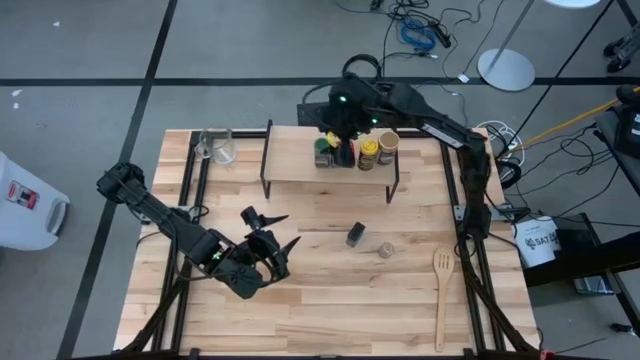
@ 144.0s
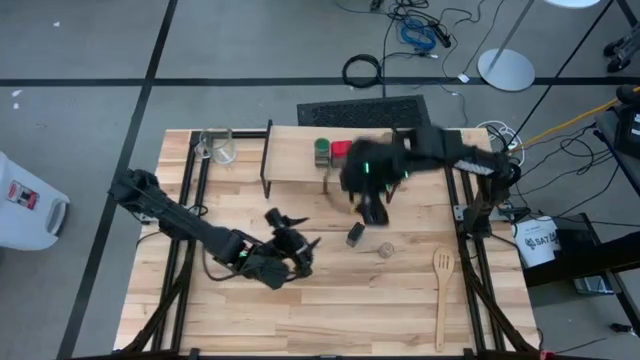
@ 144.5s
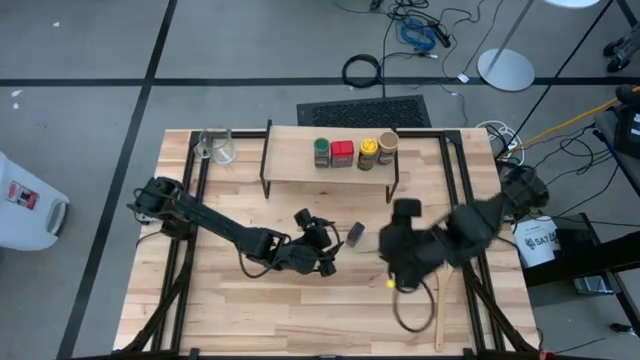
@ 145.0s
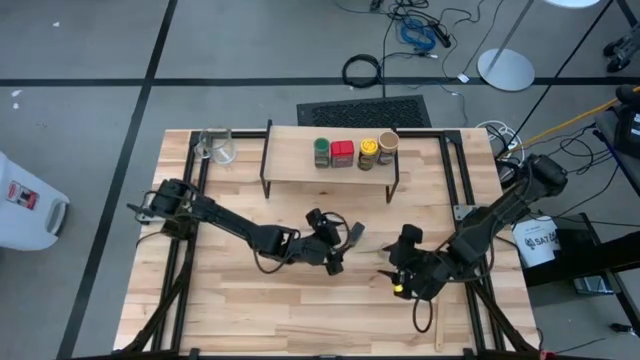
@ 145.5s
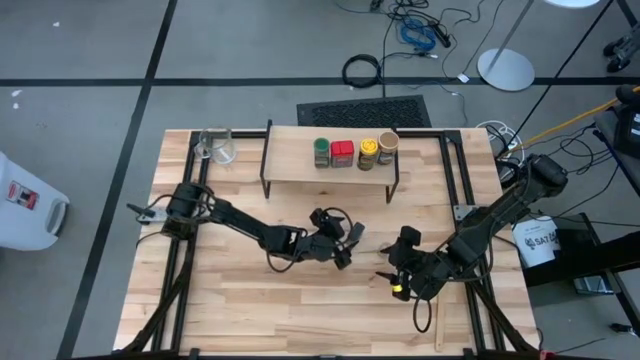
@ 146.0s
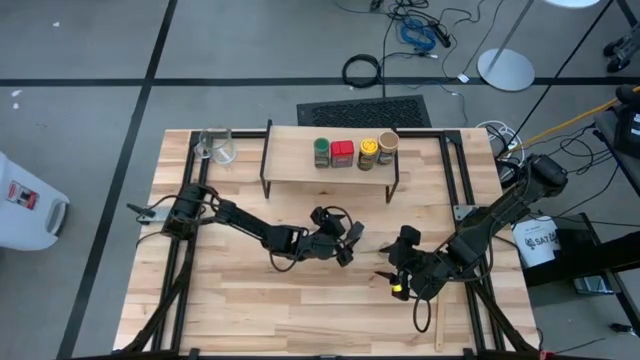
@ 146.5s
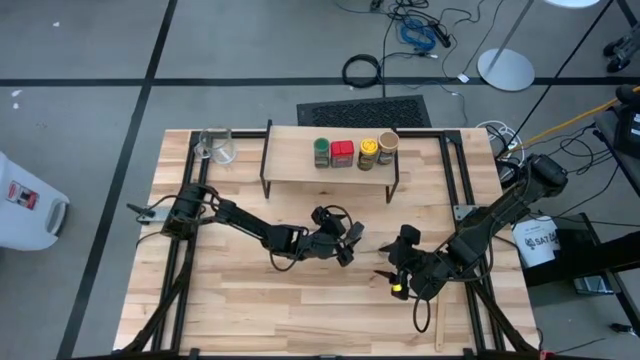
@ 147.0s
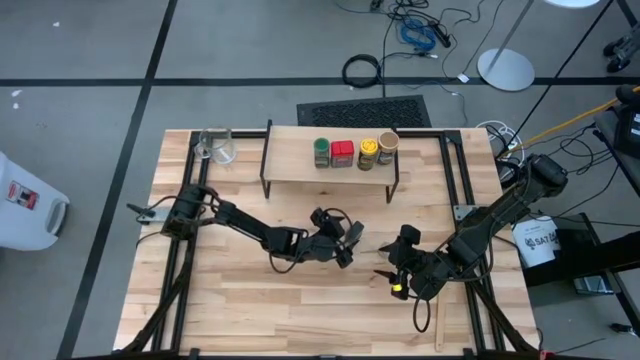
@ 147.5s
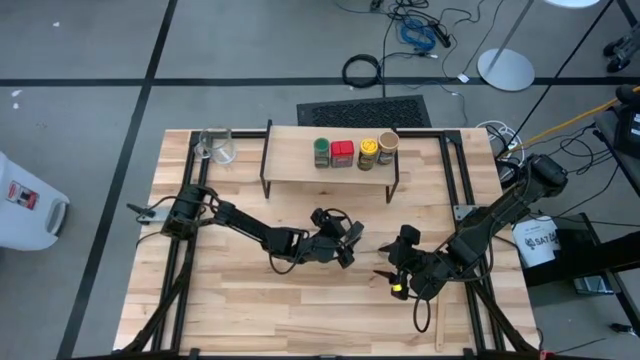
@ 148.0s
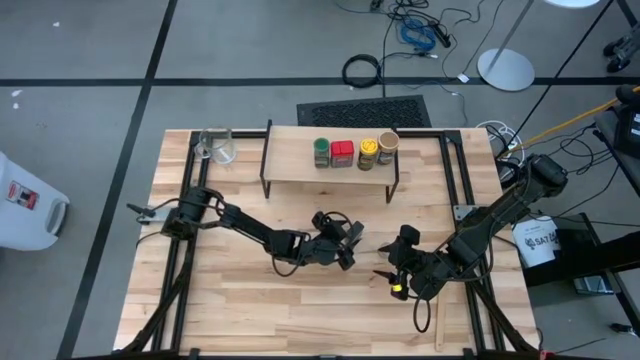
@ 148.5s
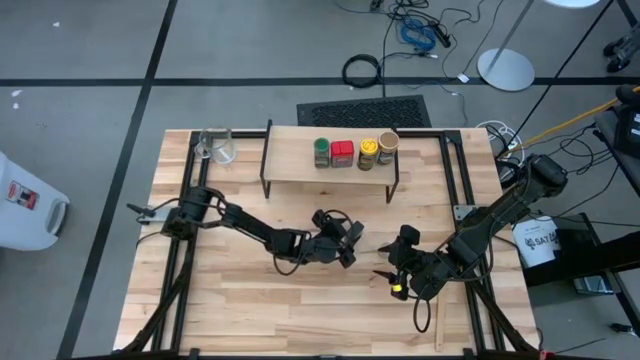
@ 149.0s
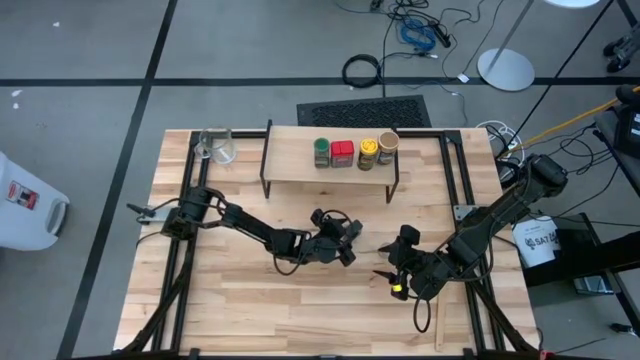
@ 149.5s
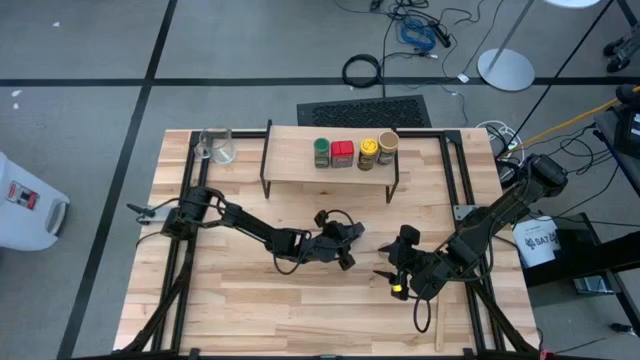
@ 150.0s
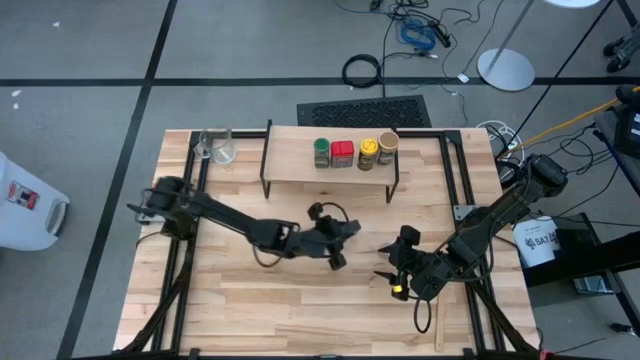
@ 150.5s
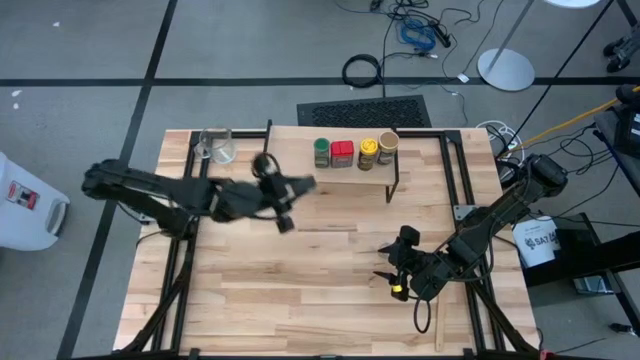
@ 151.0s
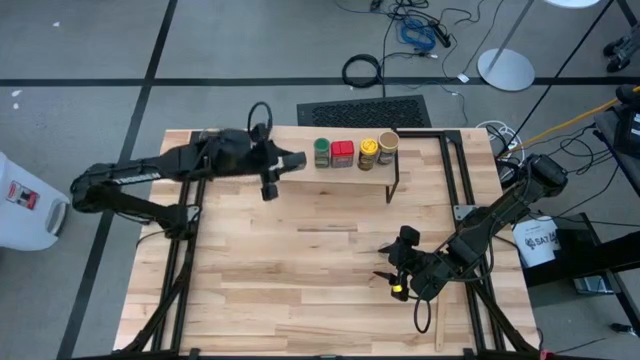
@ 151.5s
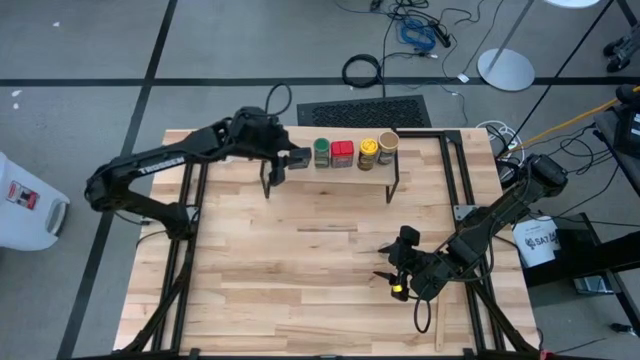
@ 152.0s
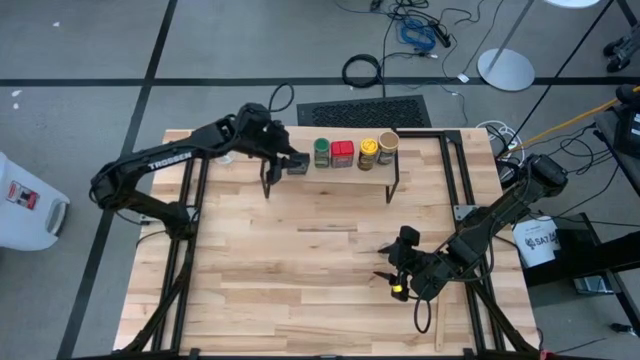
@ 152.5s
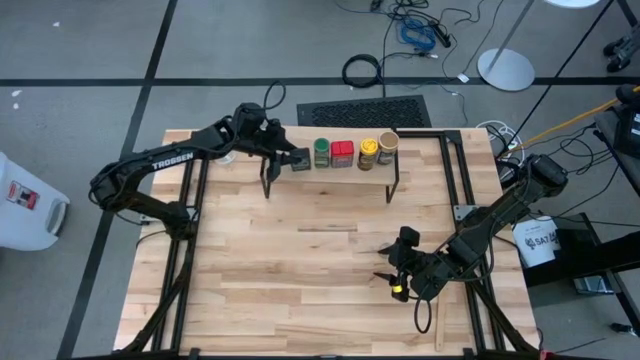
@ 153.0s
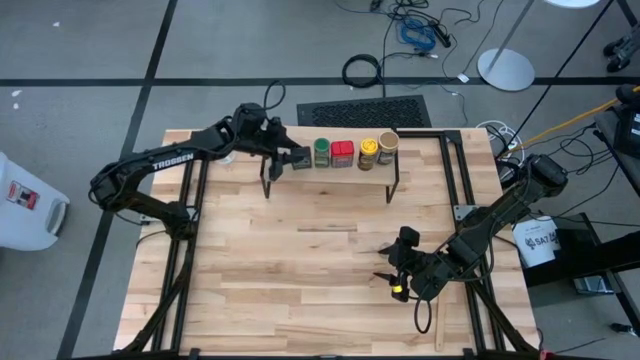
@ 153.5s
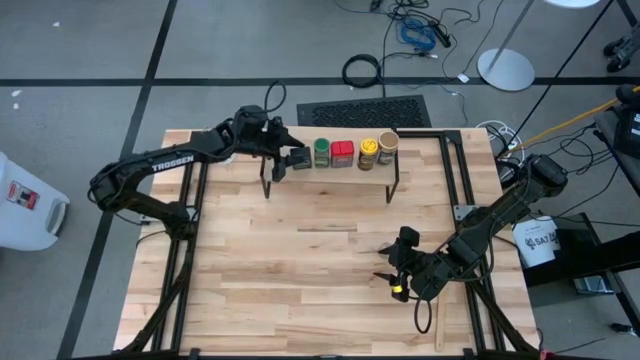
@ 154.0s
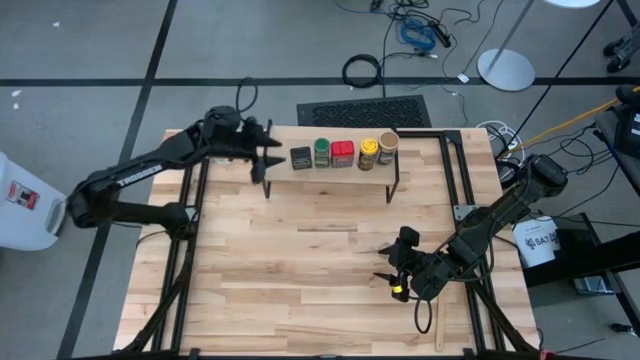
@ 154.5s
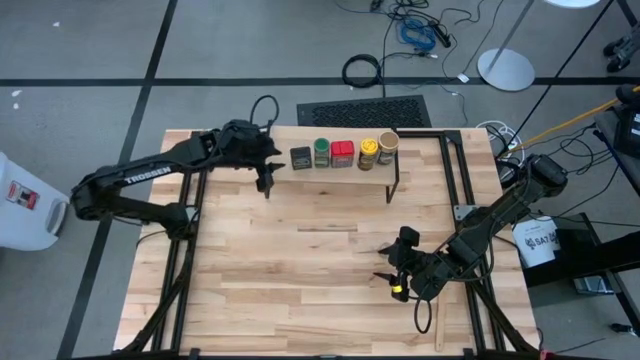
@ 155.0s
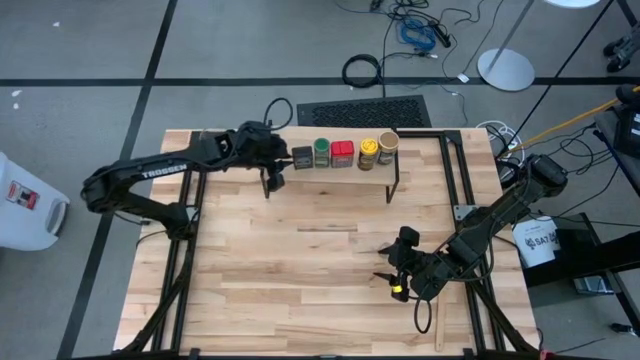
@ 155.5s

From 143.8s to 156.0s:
Task: Shelf spices
Put the black seasoning can on the shelf
